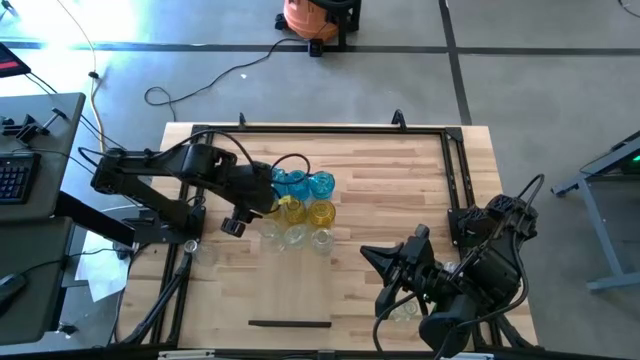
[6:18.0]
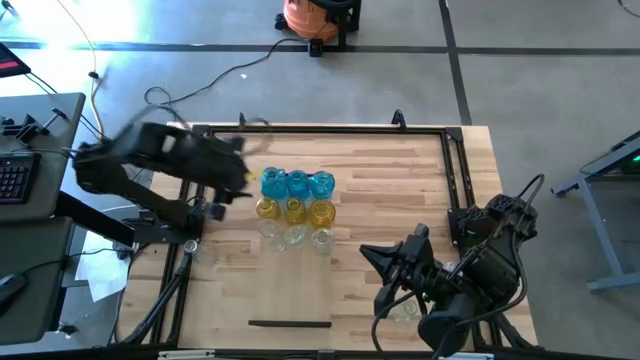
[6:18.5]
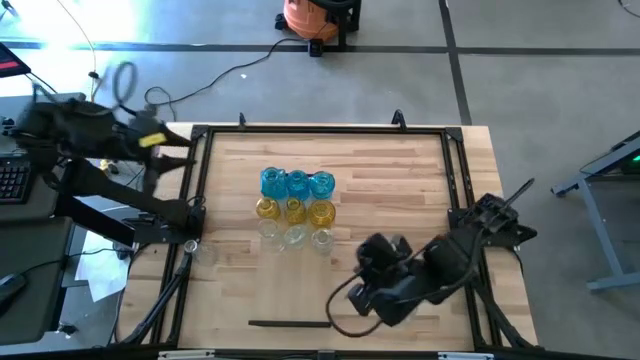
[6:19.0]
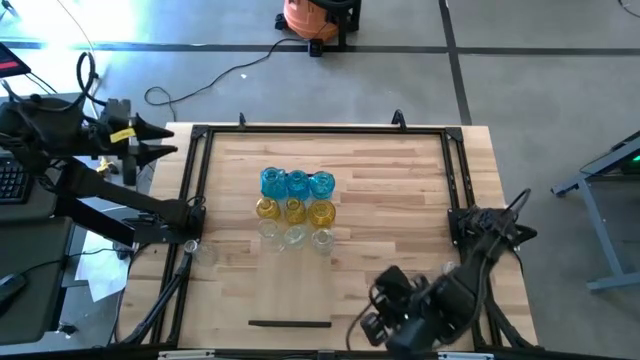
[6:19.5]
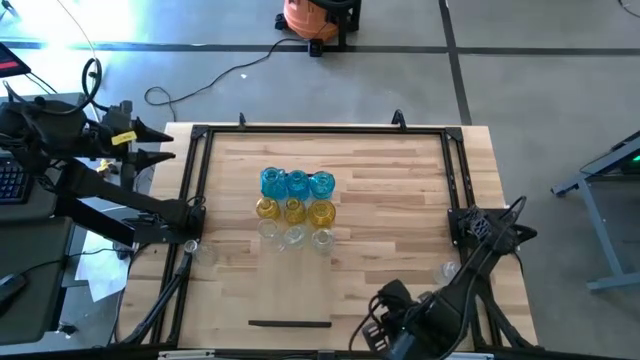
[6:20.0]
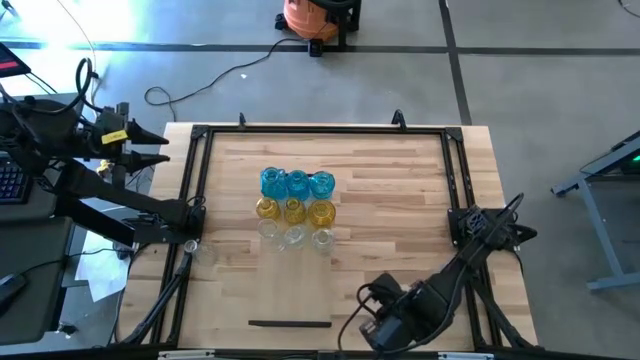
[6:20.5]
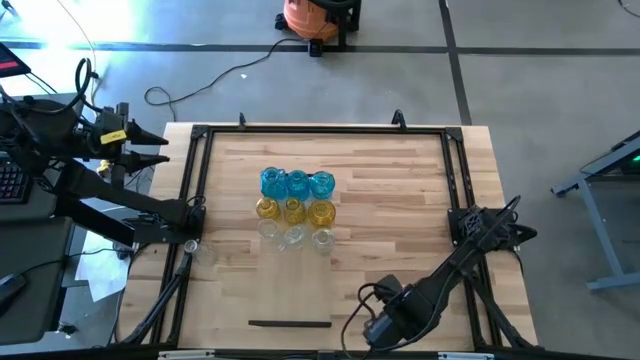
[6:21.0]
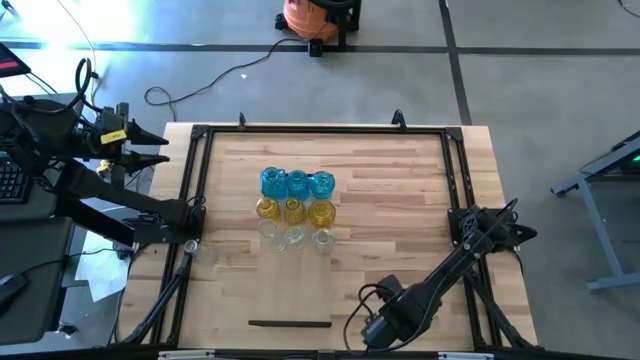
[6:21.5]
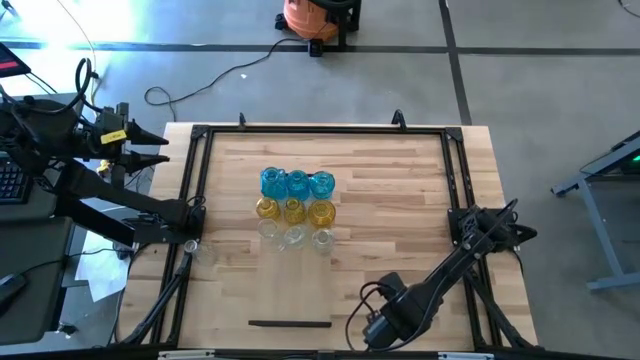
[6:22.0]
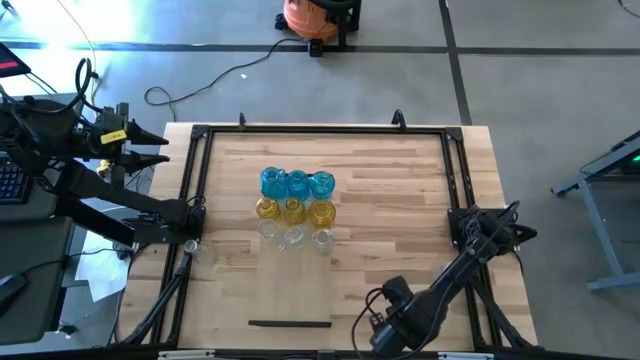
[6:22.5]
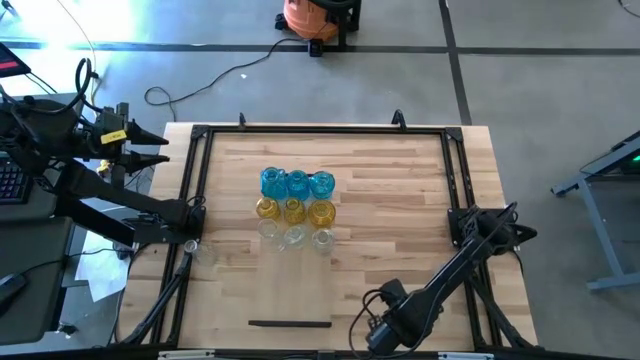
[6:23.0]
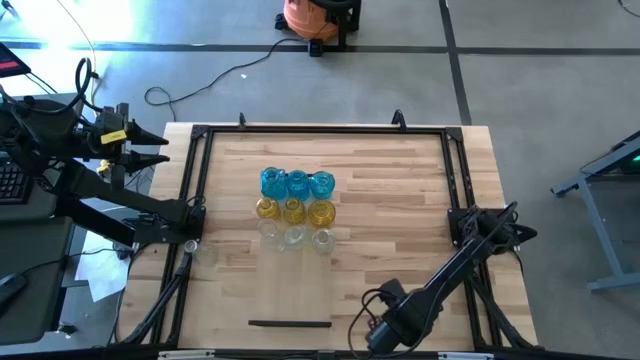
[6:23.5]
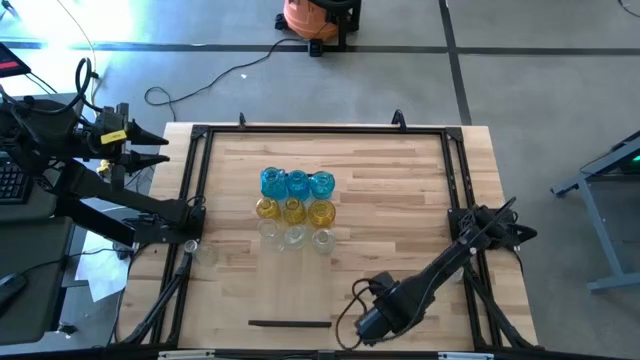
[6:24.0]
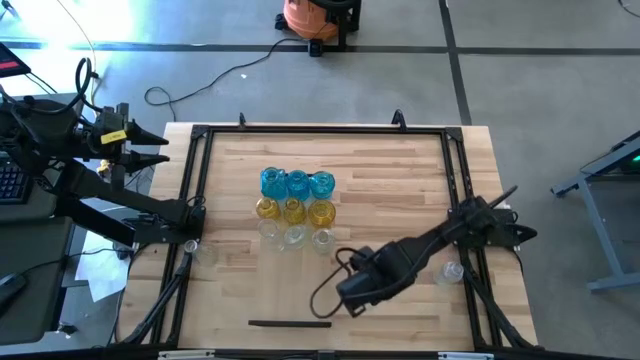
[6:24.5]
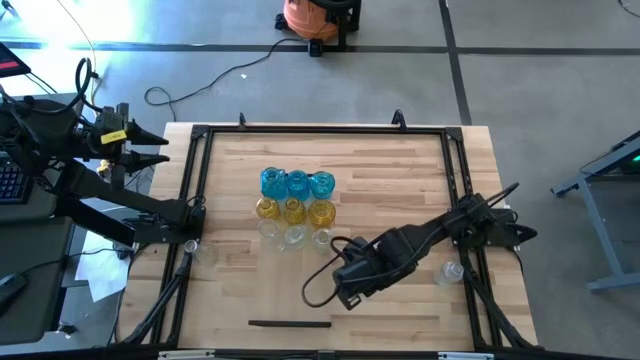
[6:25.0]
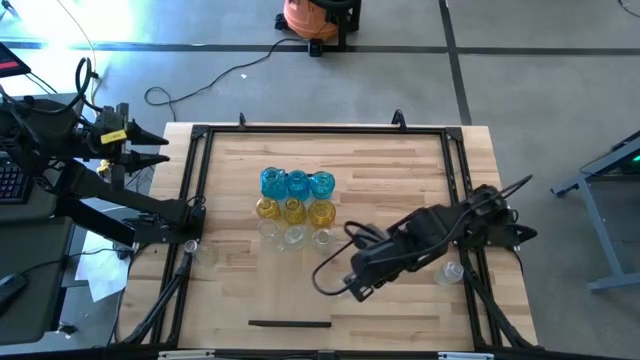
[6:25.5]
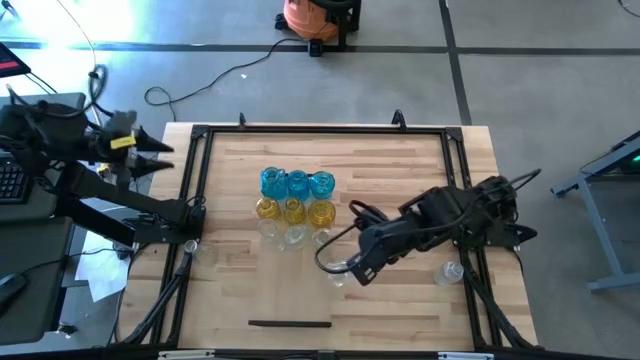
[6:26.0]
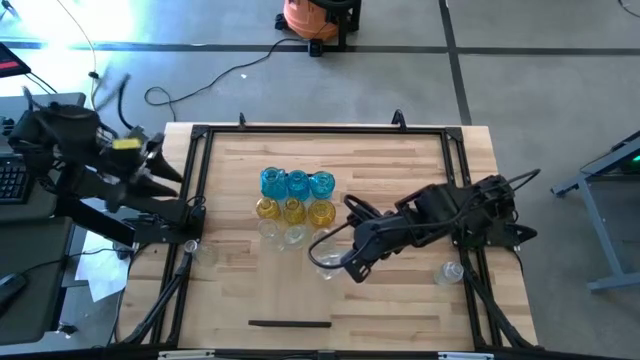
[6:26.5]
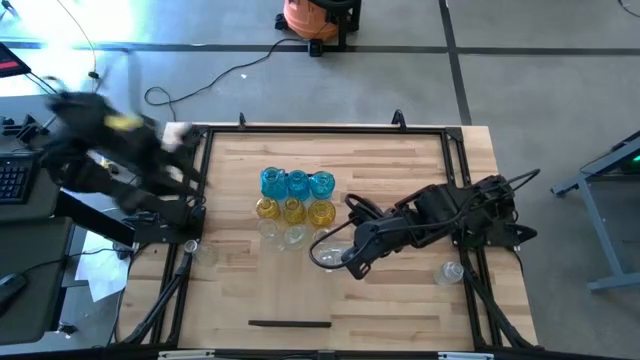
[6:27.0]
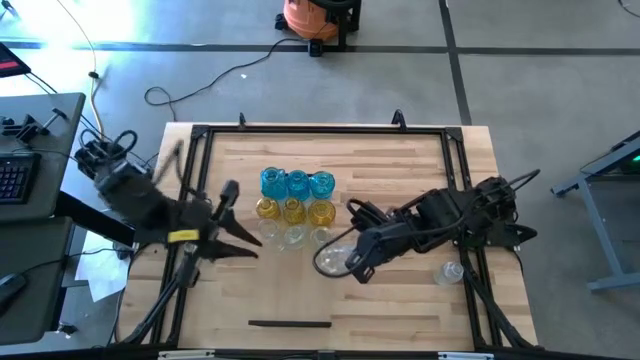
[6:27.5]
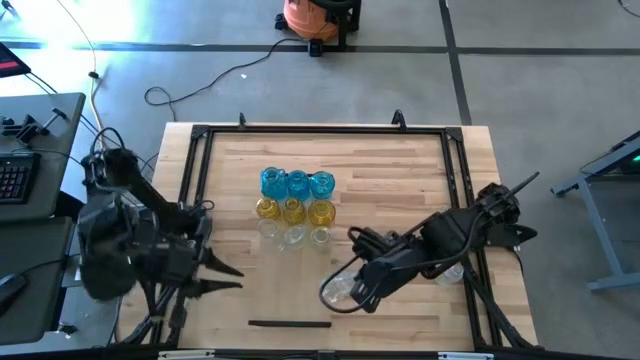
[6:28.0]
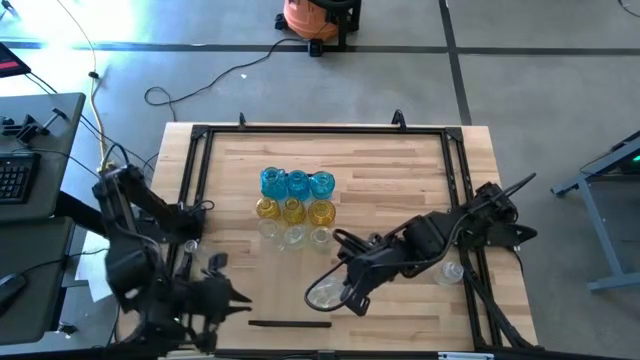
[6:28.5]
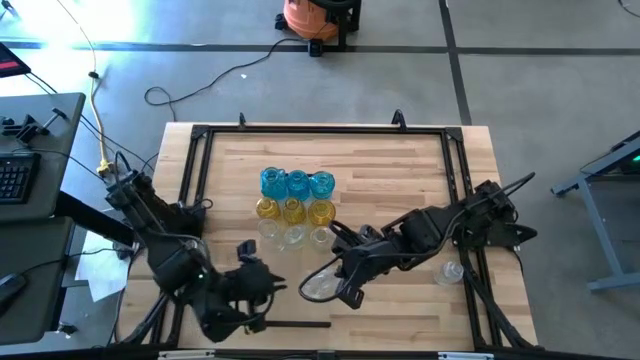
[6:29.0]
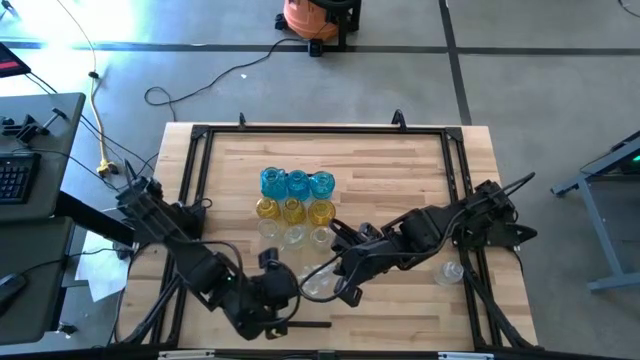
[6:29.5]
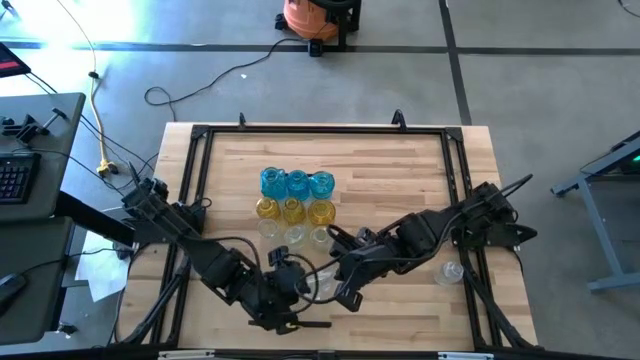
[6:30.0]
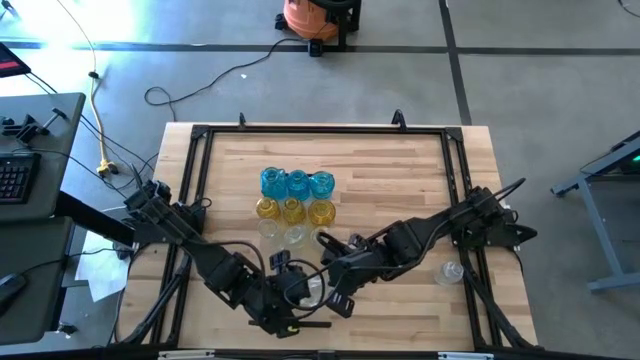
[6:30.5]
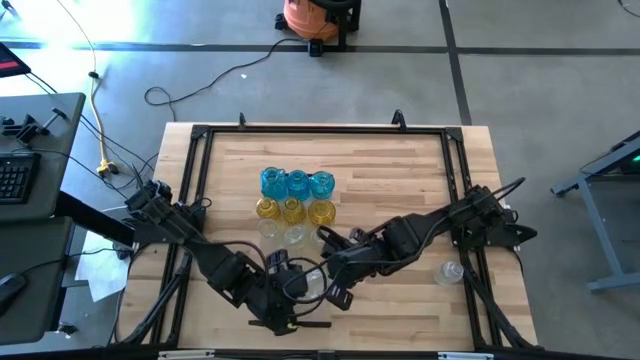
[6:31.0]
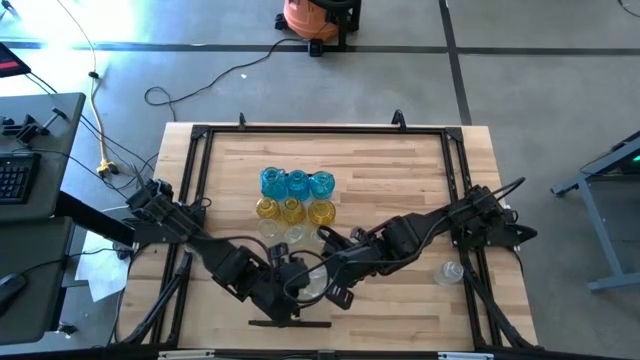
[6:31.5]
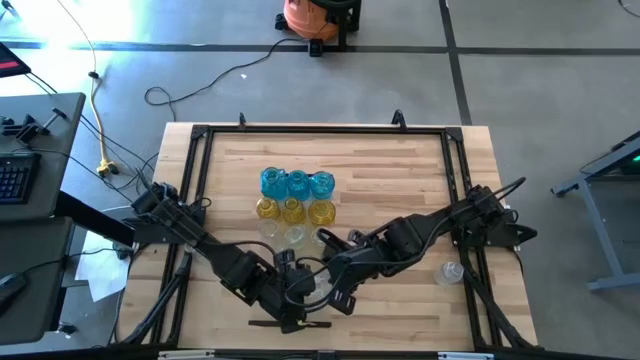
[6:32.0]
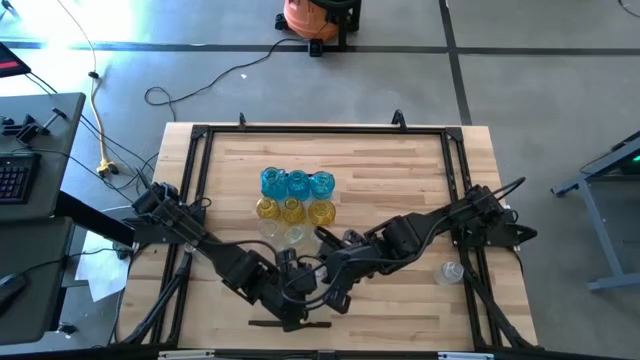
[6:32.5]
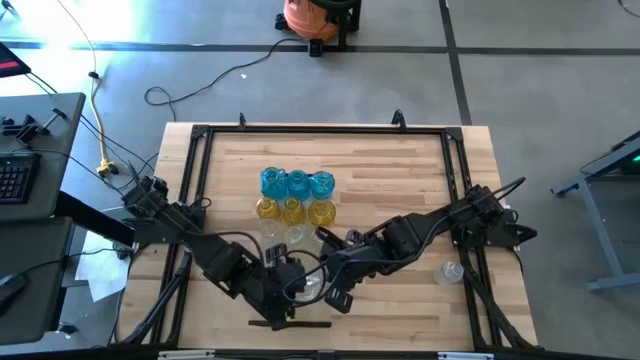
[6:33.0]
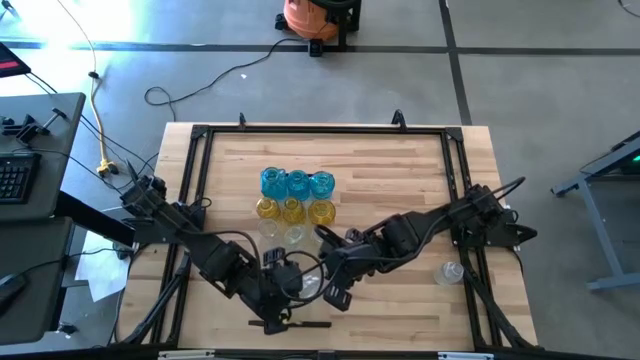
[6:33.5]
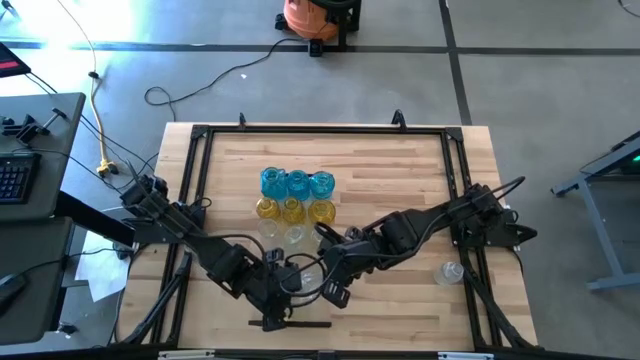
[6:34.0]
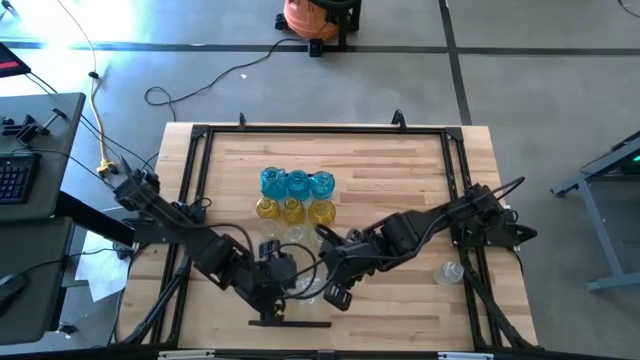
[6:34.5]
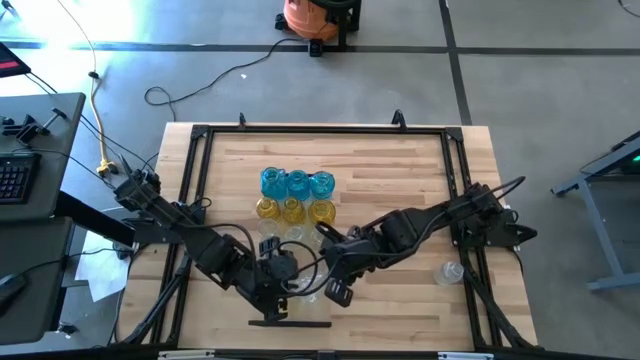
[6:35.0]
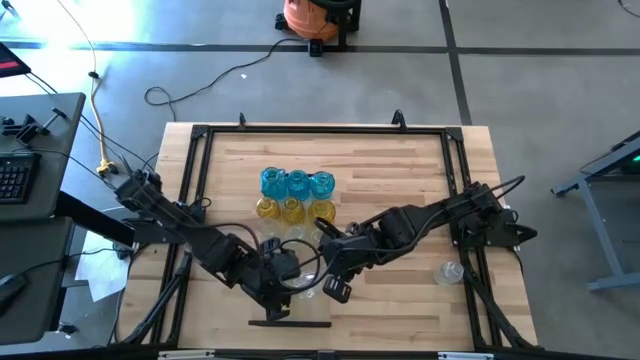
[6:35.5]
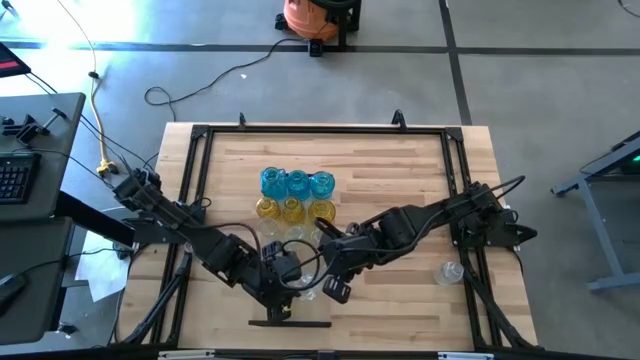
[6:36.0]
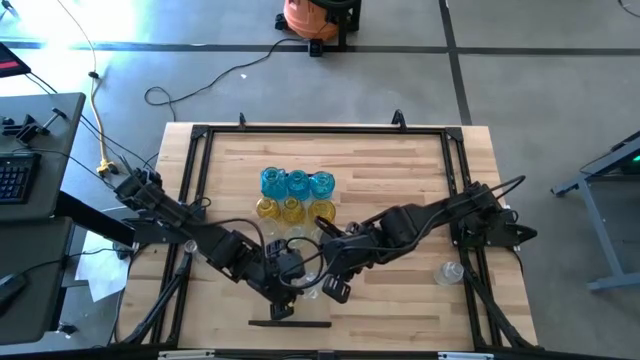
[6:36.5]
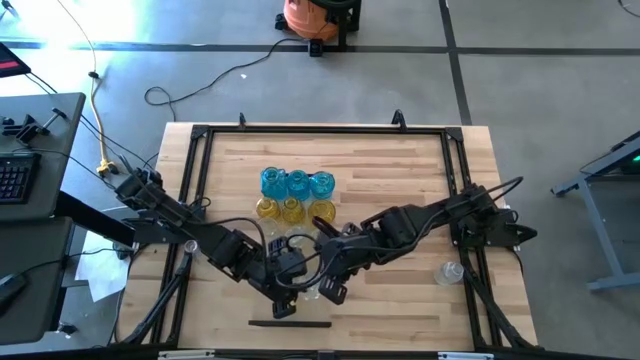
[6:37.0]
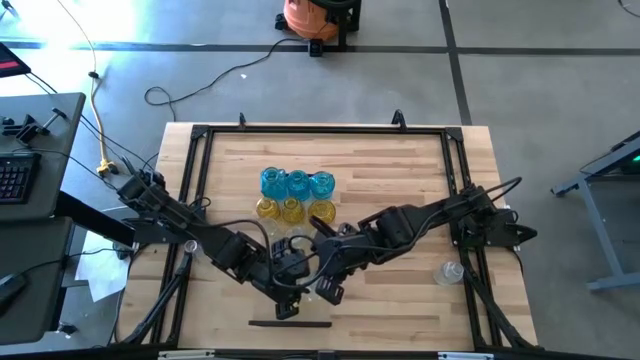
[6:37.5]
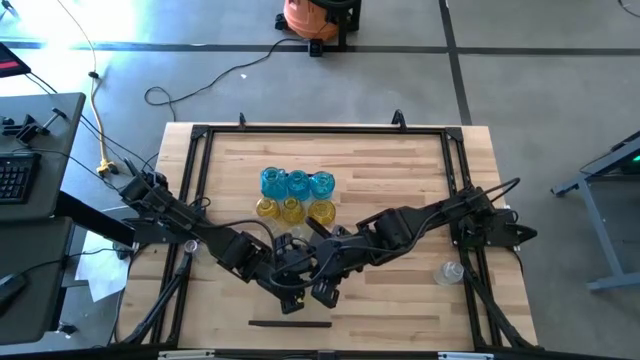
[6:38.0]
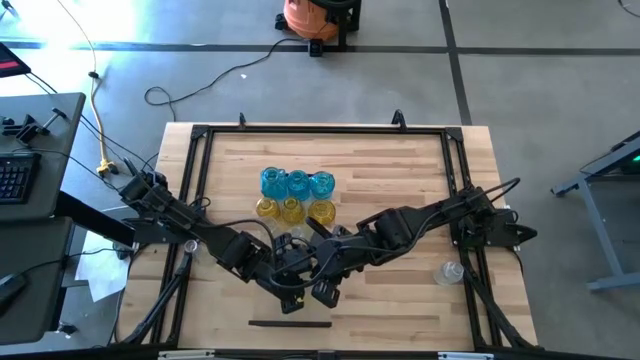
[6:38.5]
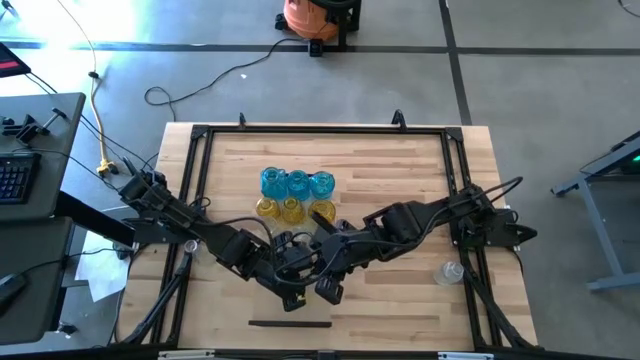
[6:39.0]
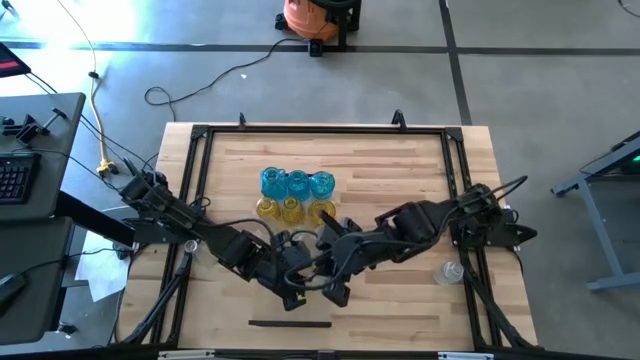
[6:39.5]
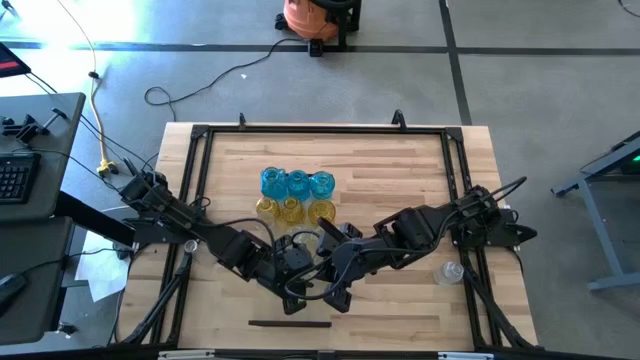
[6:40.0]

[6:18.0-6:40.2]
Task: sort vases onto shelf
Put the bottom transparent vase on the shelf
